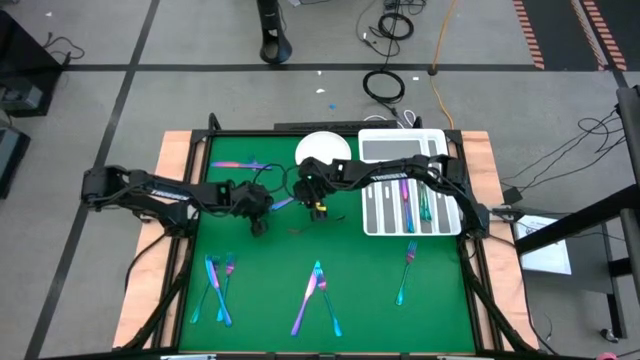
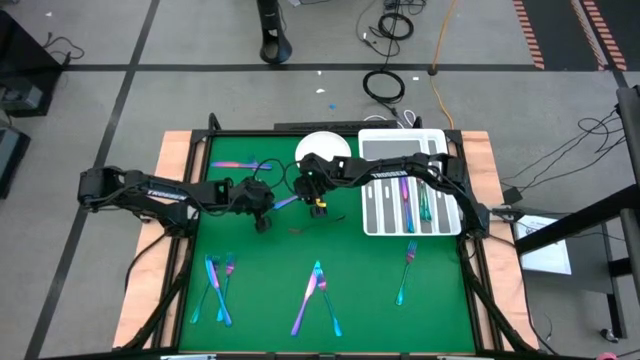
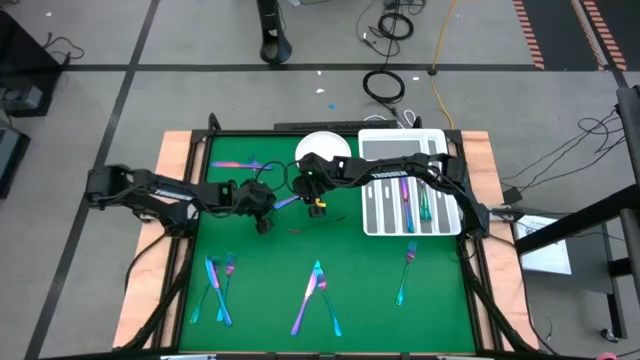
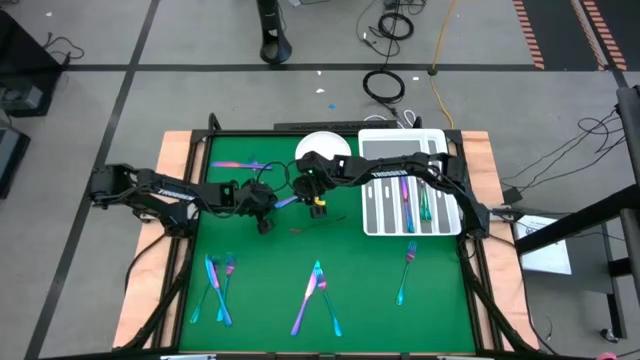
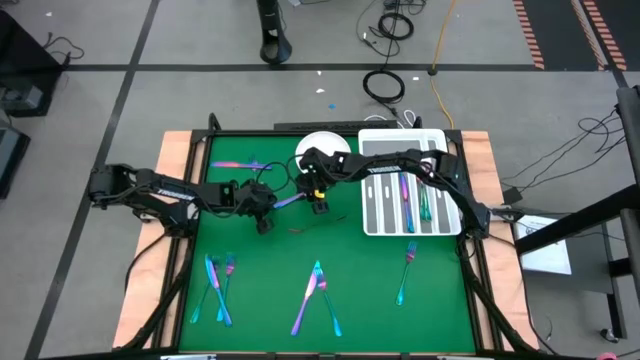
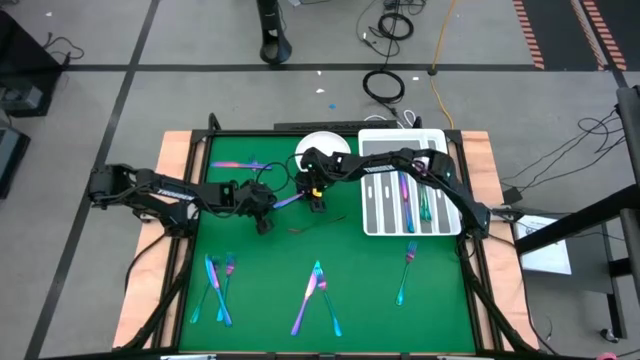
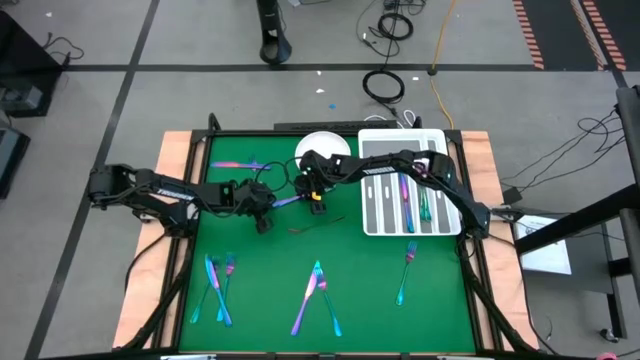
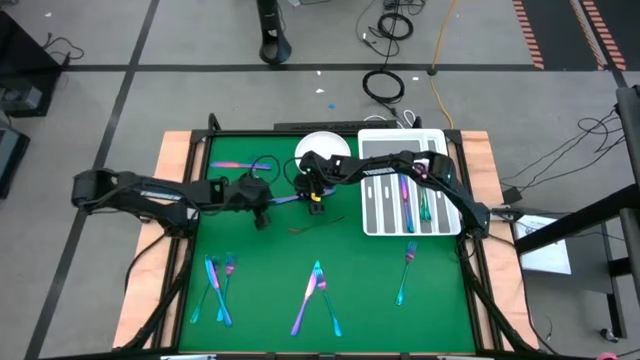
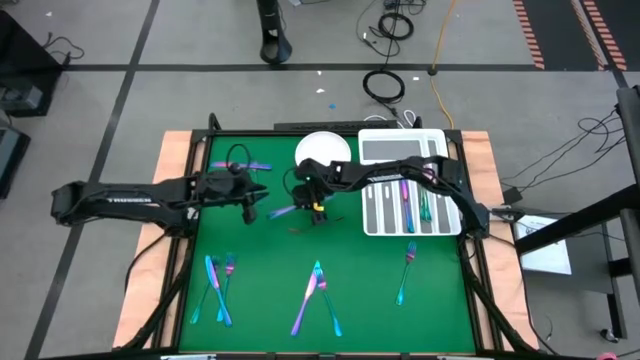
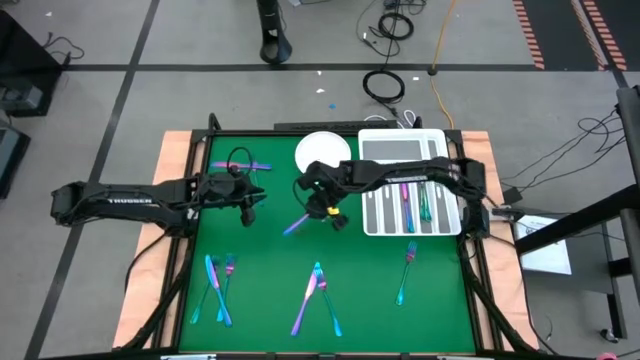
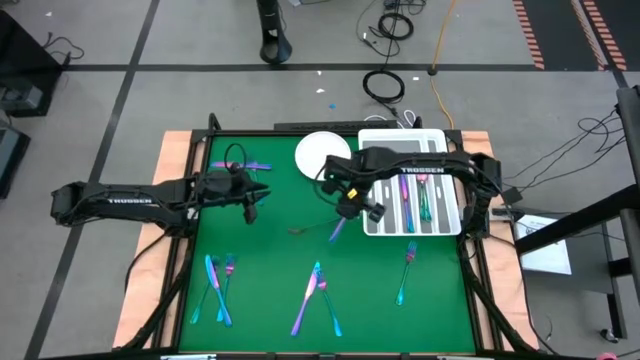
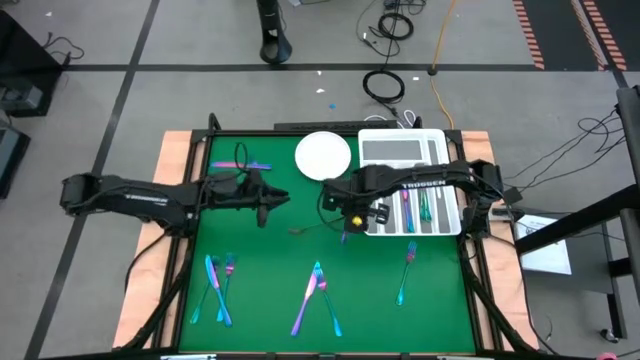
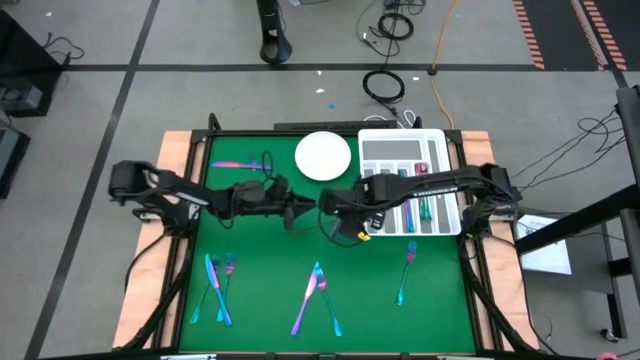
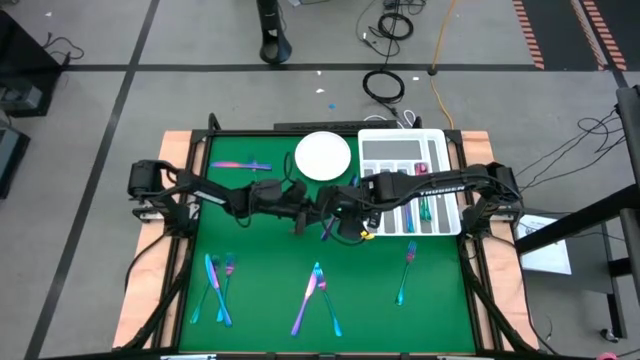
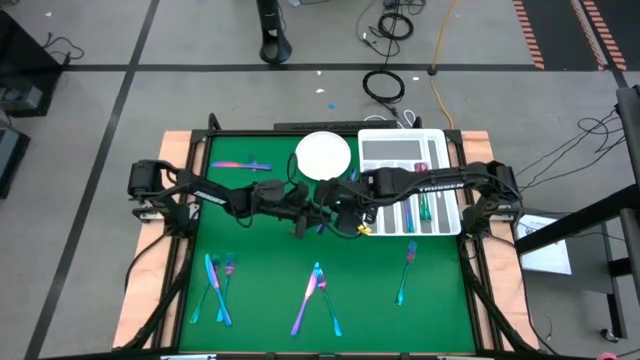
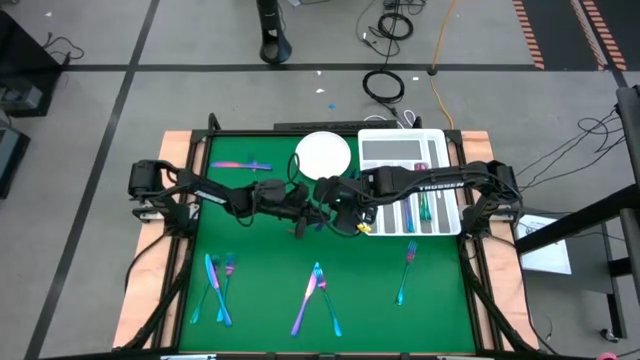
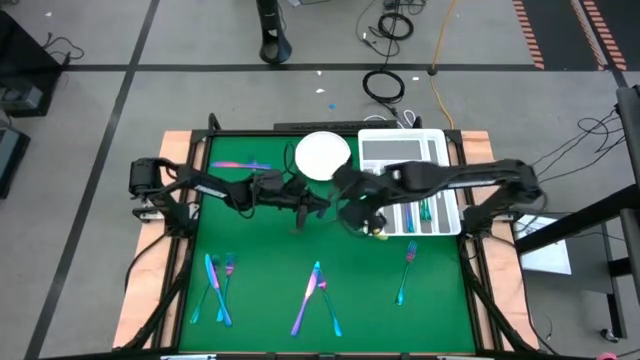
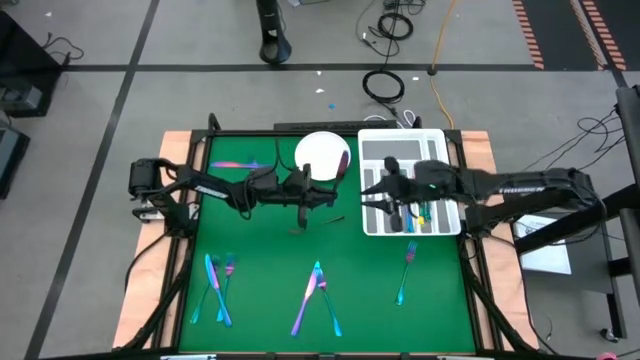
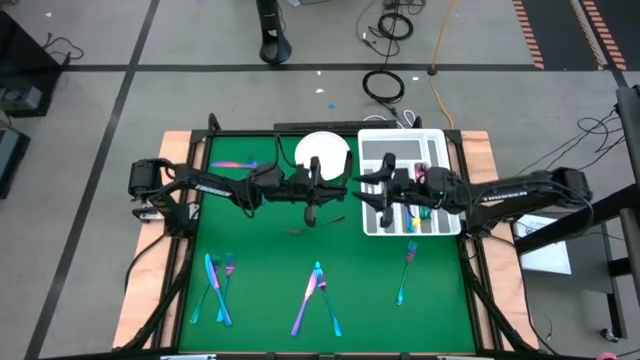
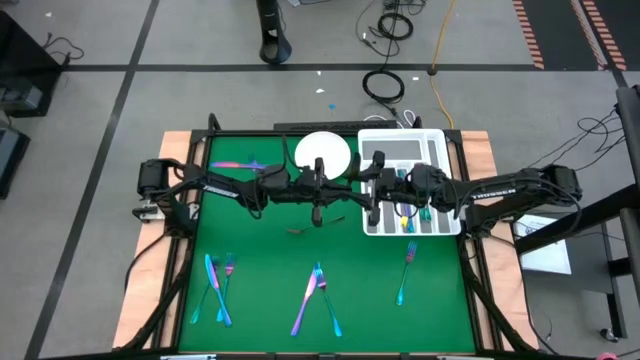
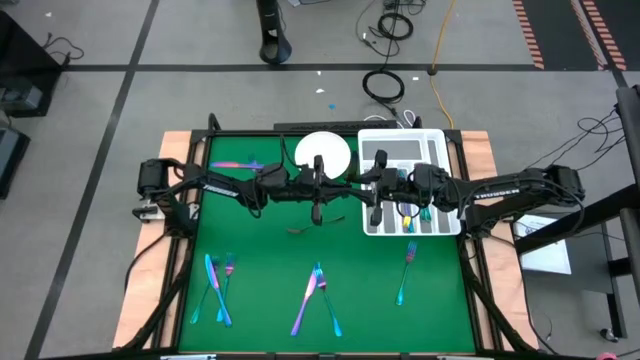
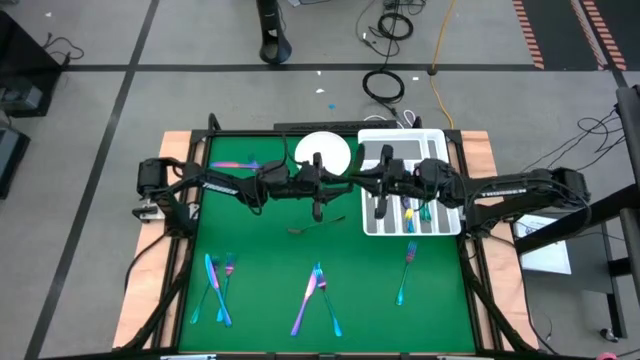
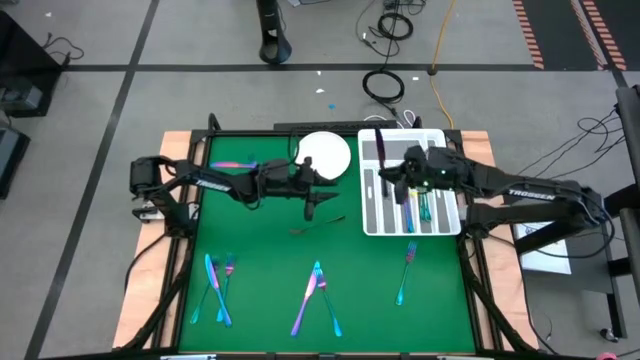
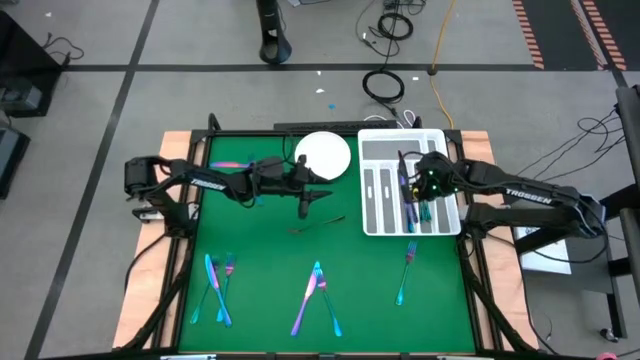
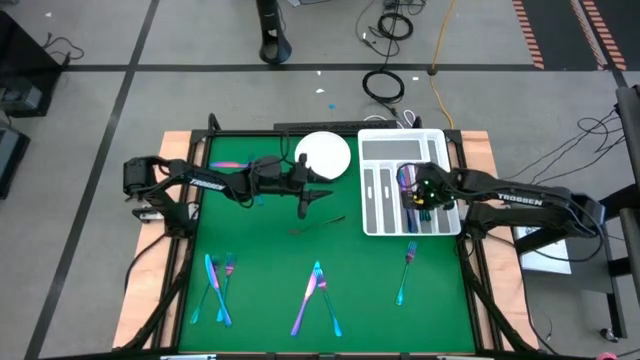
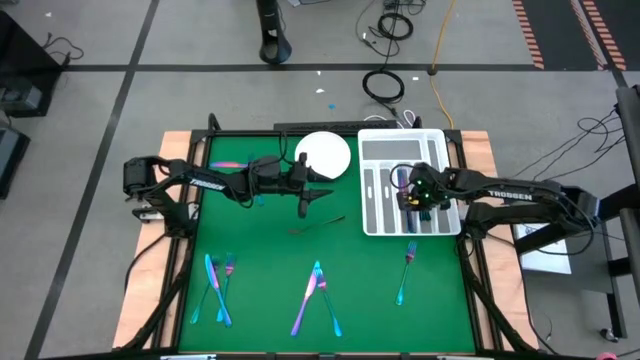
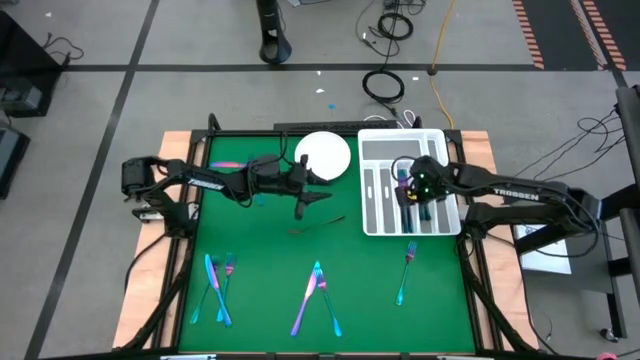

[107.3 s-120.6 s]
Task: Sort silverware
Put the iridescent knife into the white silverware tray

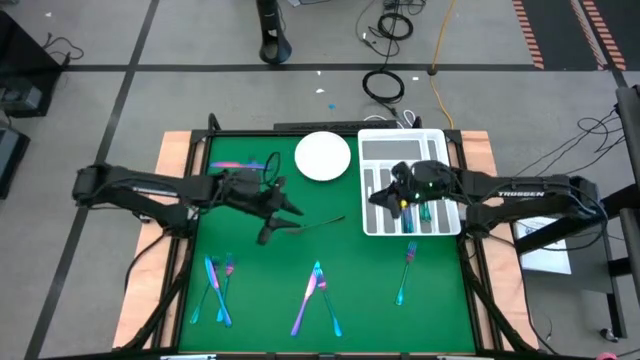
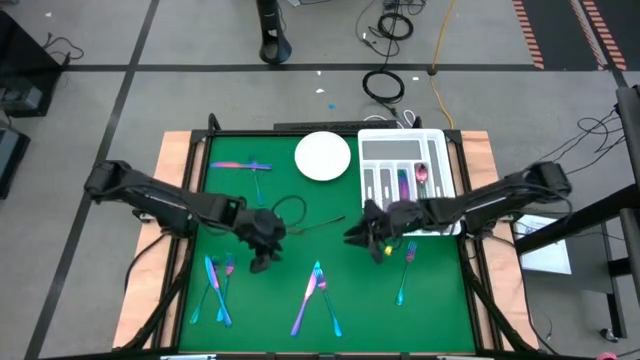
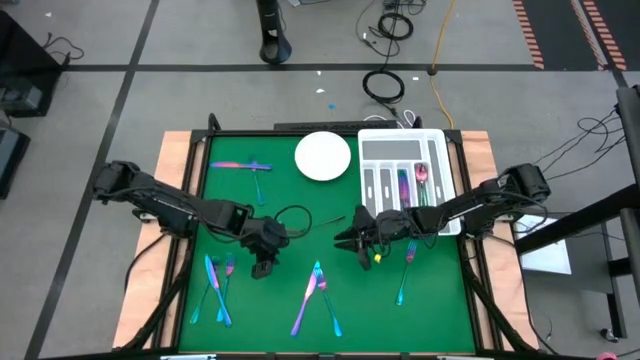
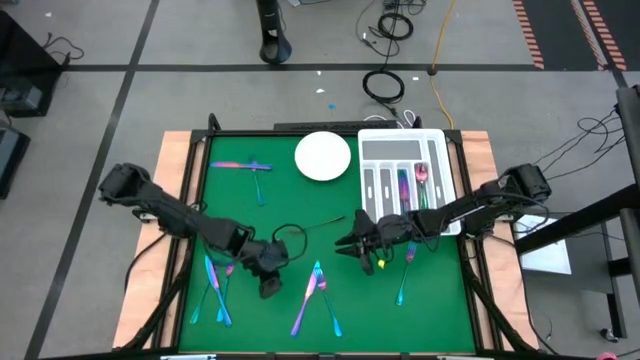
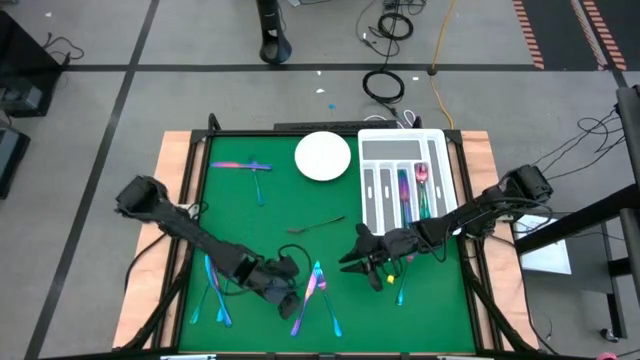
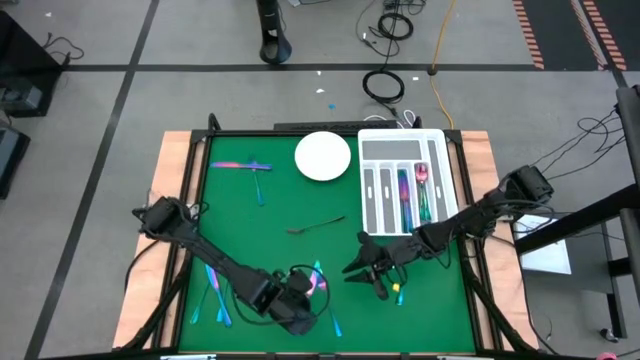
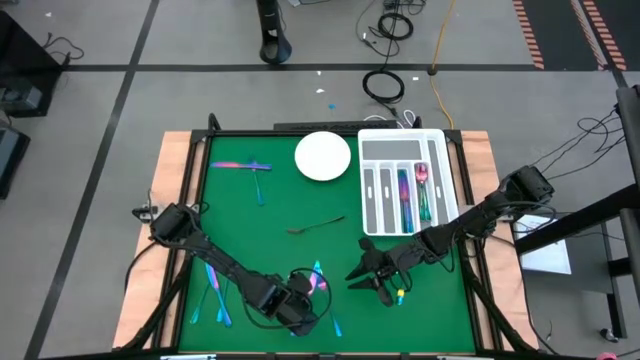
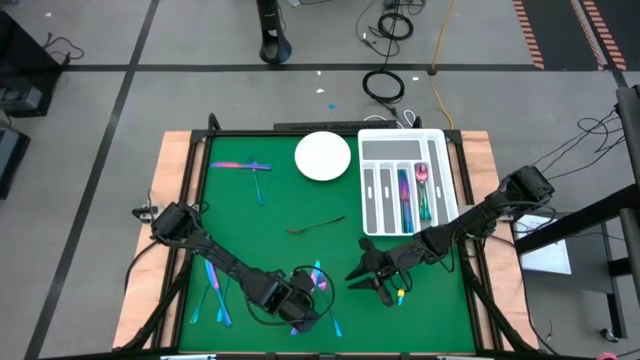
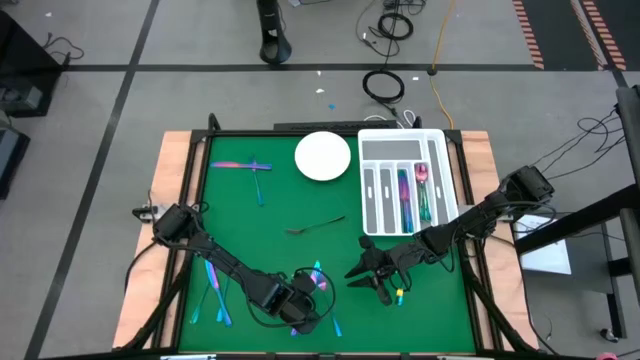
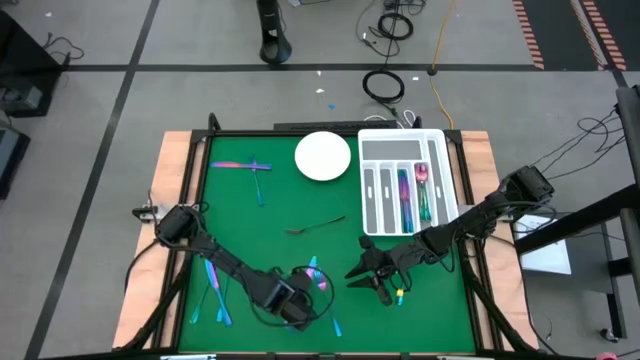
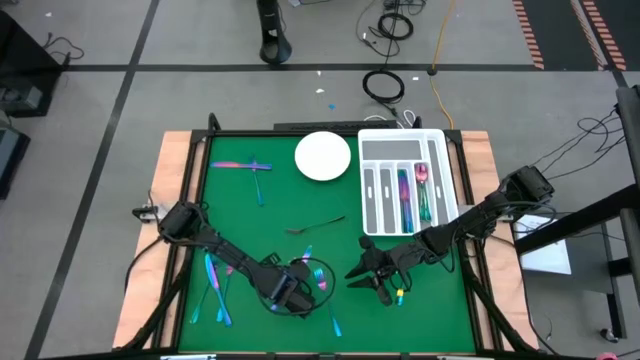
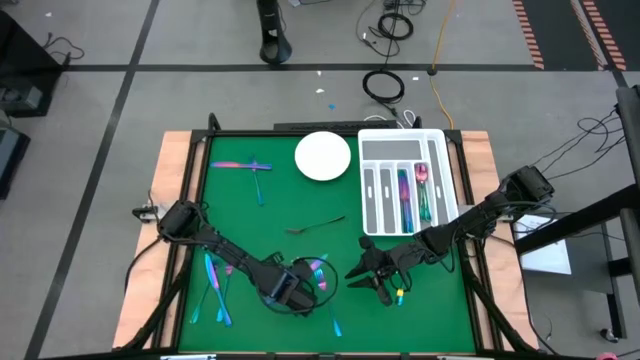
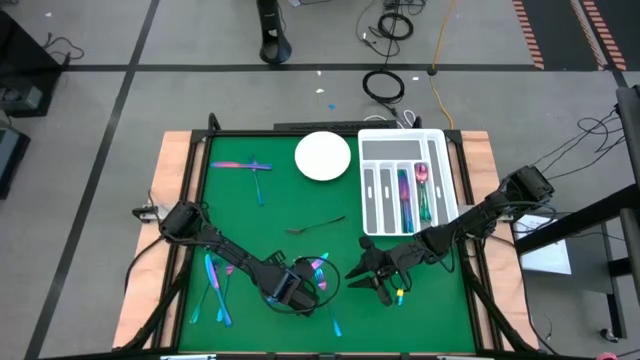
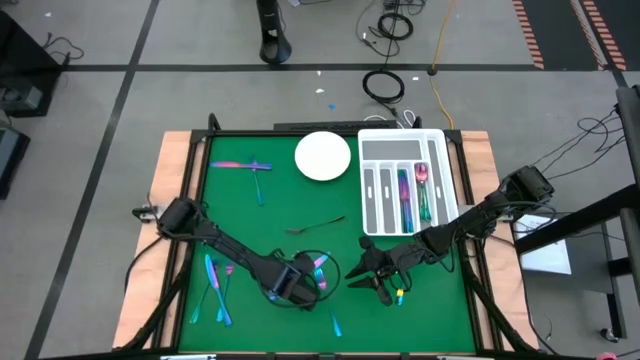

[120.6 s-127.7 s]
Put the iridescent knife into the white silverware tray

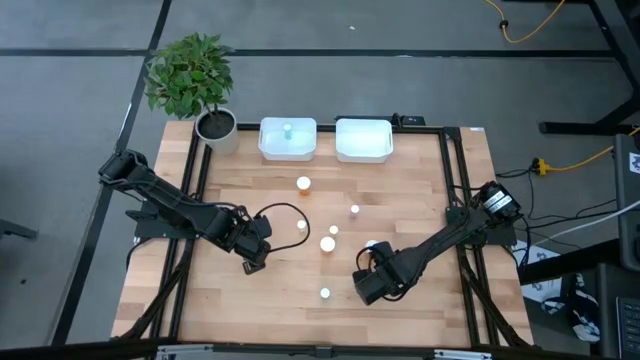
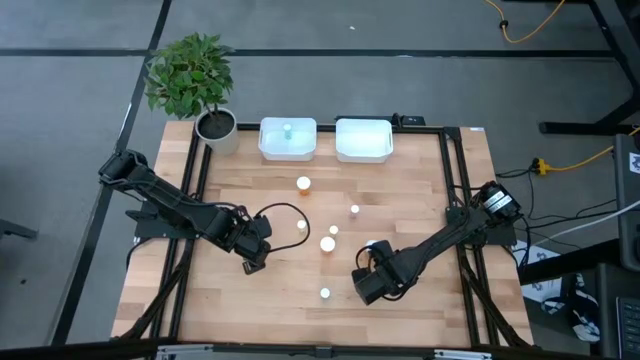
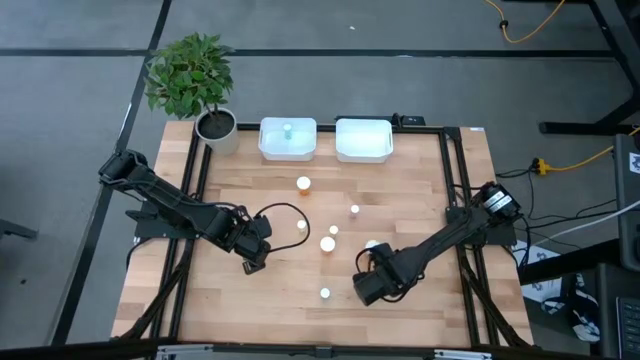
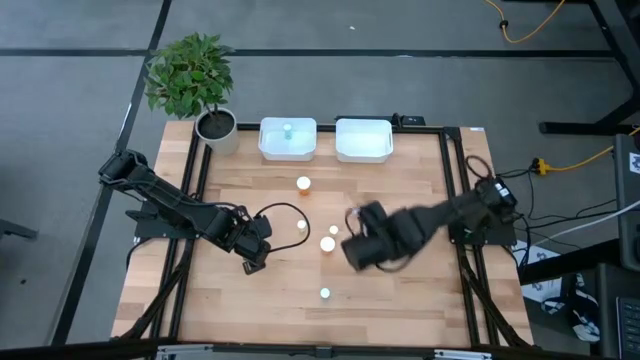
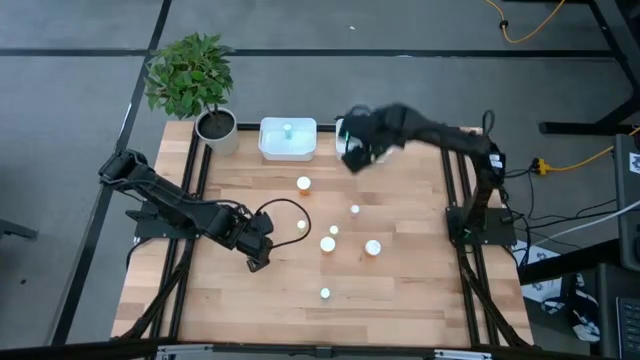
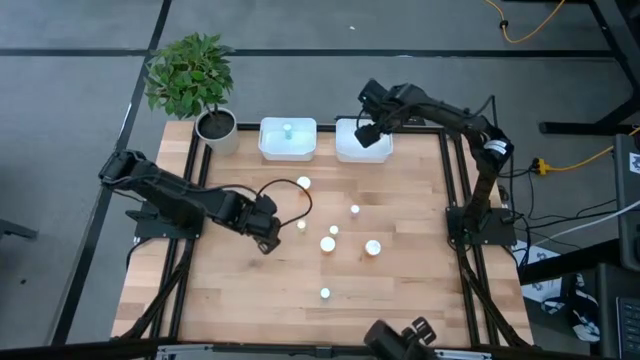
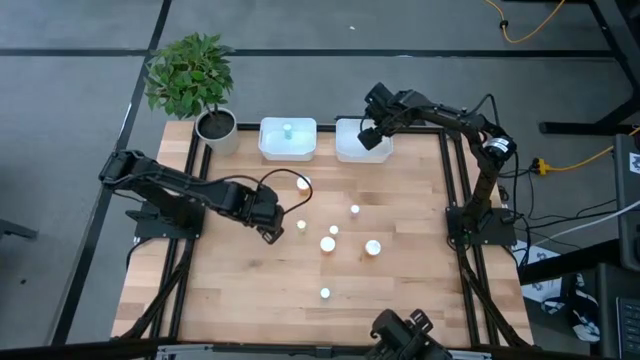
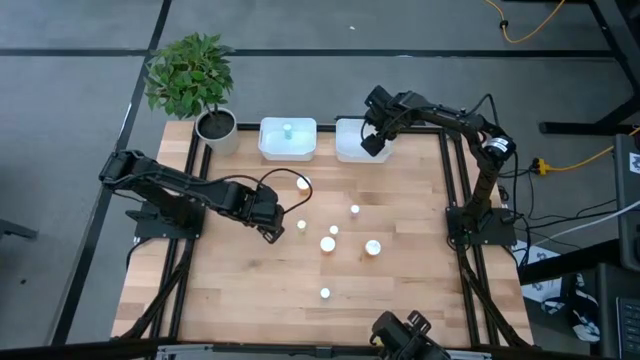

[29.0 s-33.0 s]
Task: Pick and place medicine bottles into bin by pill shape (circle, oval)
Put the orange capsule bottle into the right white bin
